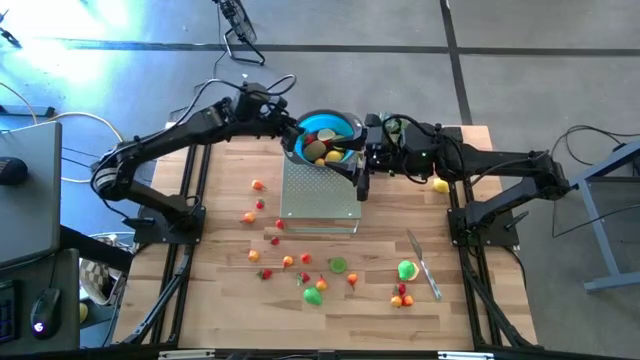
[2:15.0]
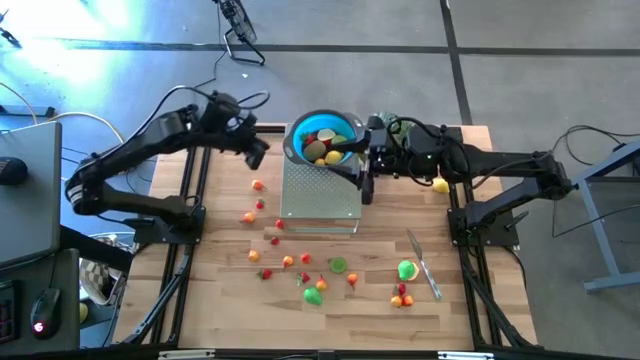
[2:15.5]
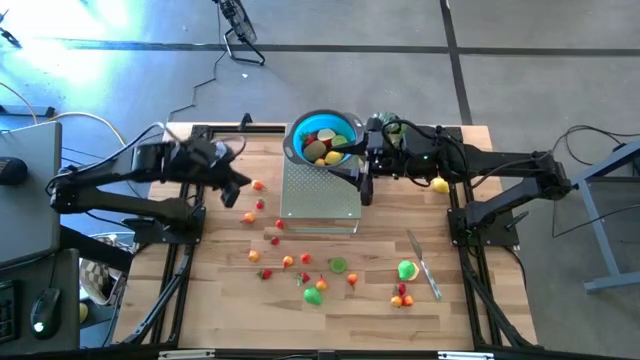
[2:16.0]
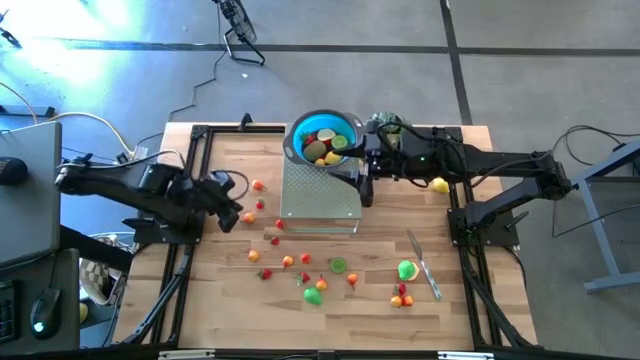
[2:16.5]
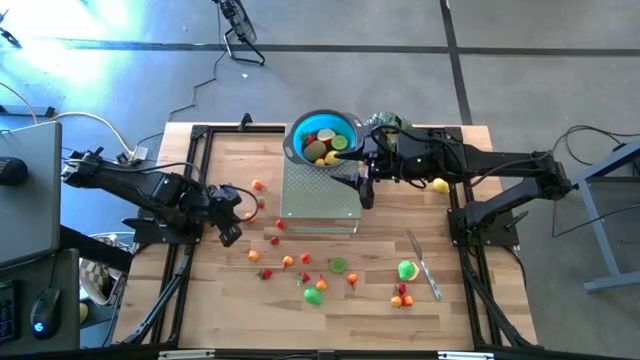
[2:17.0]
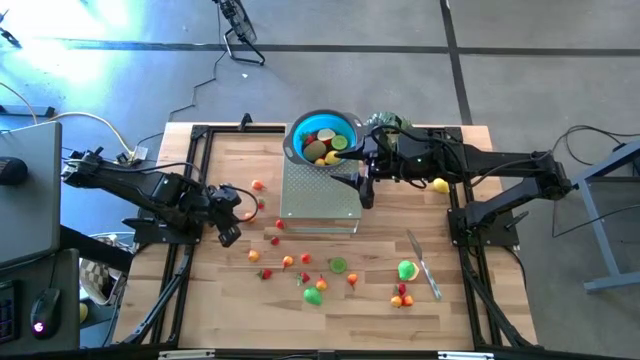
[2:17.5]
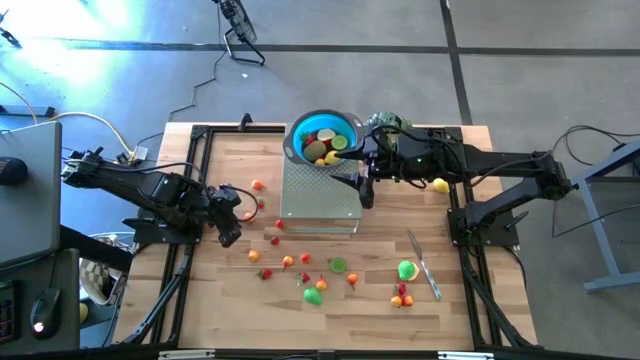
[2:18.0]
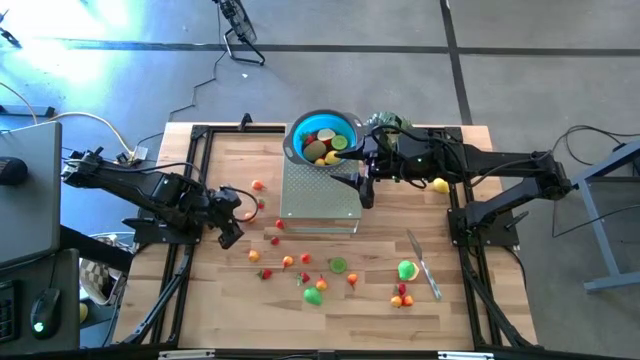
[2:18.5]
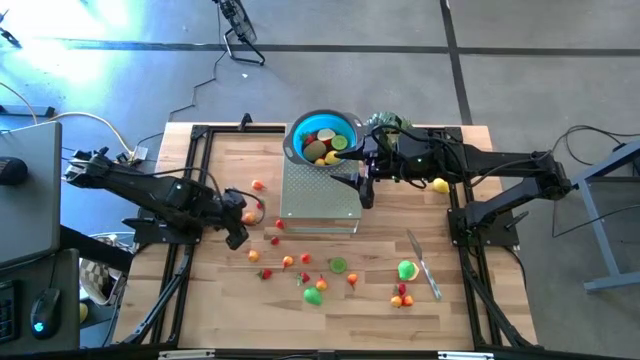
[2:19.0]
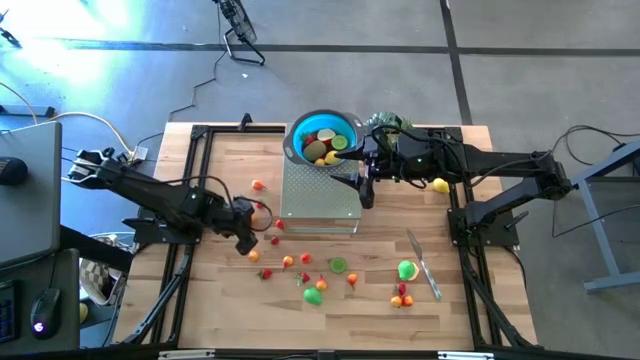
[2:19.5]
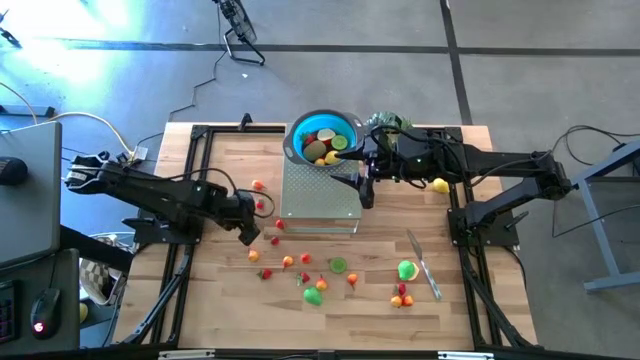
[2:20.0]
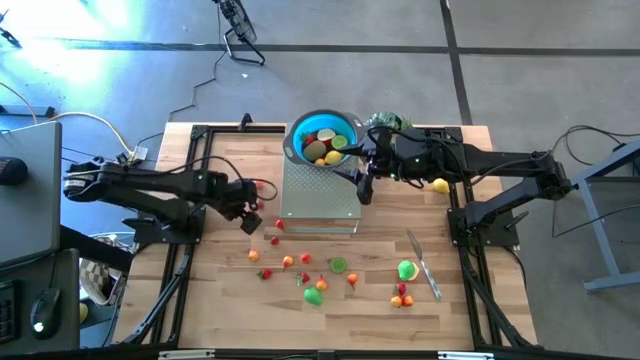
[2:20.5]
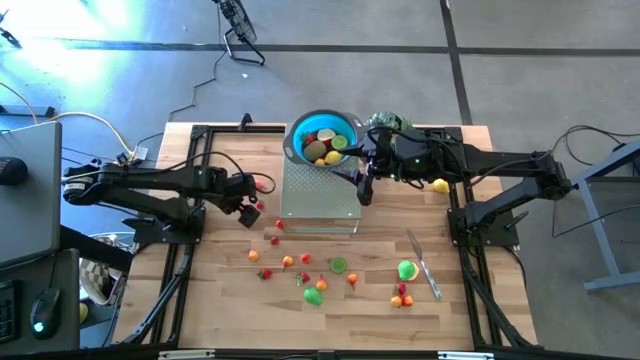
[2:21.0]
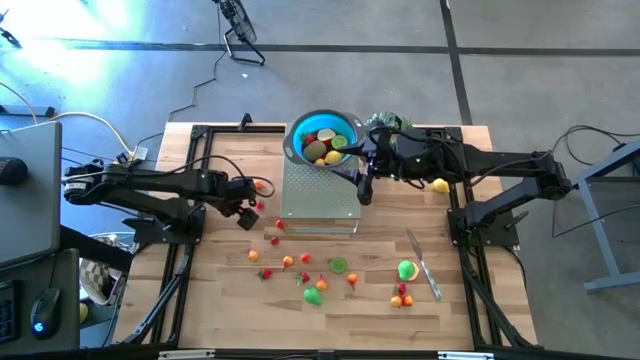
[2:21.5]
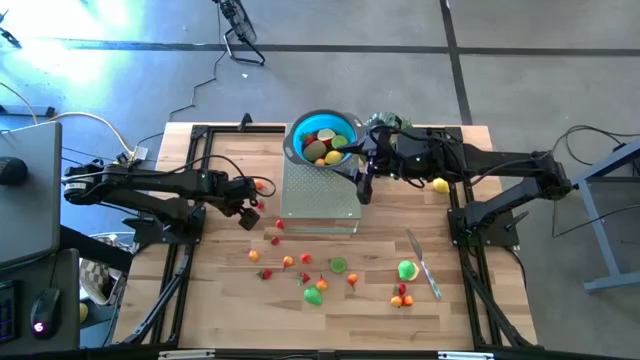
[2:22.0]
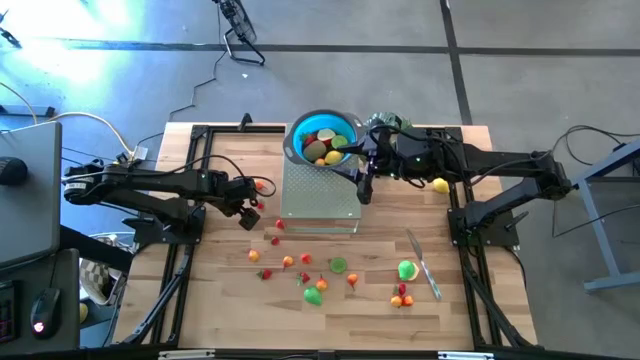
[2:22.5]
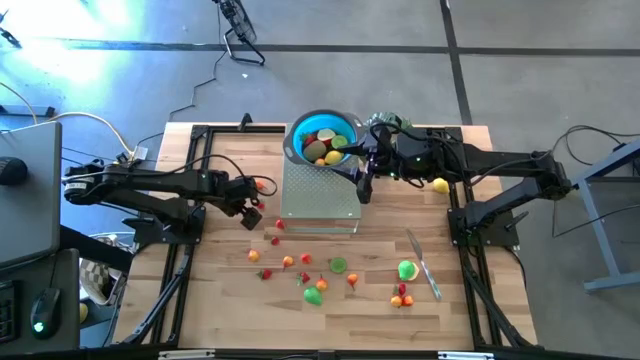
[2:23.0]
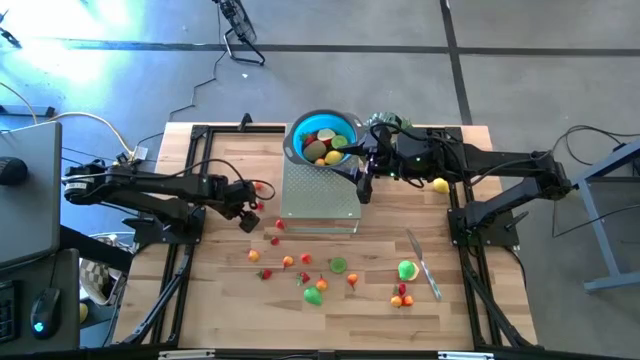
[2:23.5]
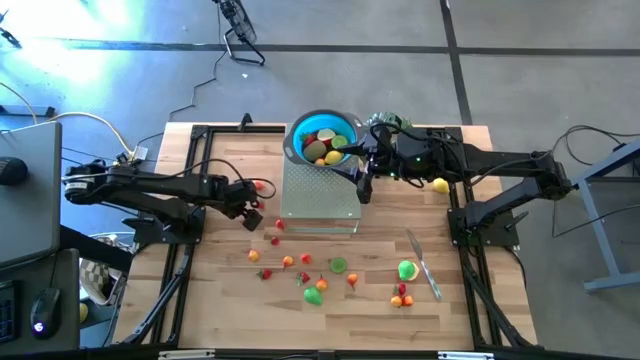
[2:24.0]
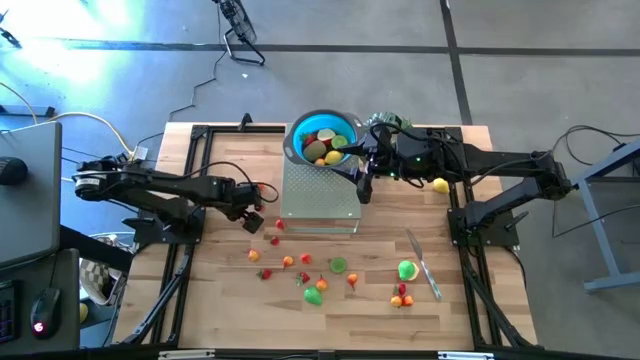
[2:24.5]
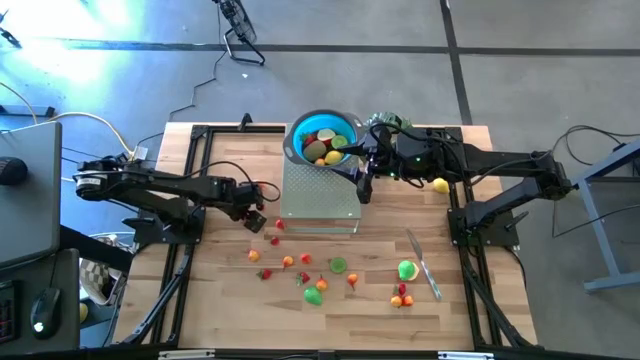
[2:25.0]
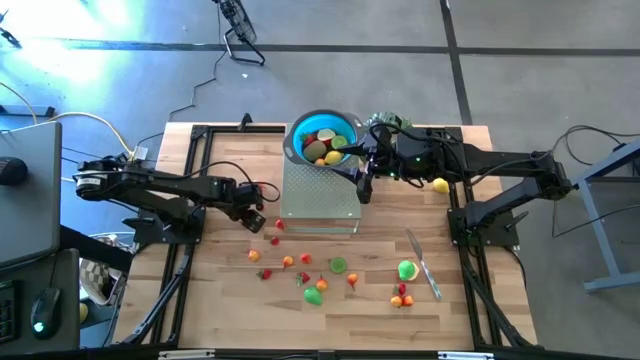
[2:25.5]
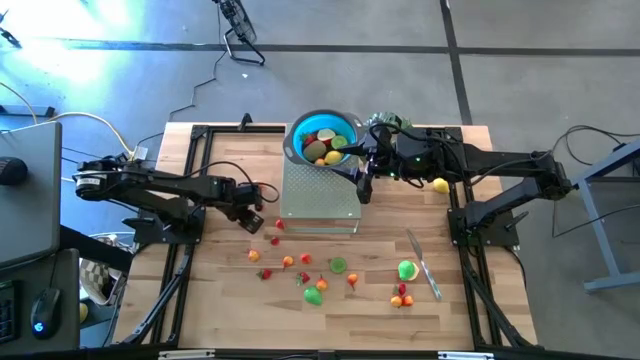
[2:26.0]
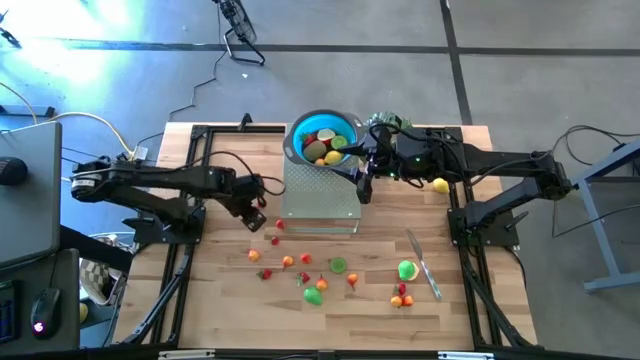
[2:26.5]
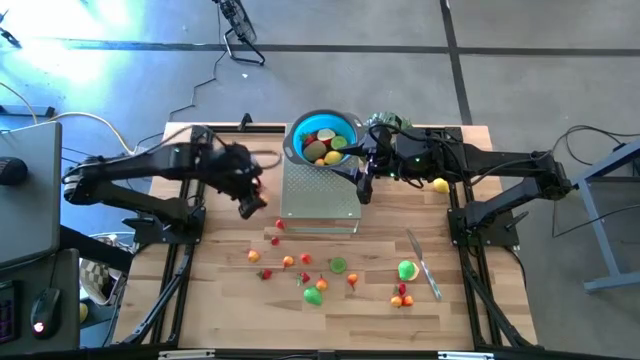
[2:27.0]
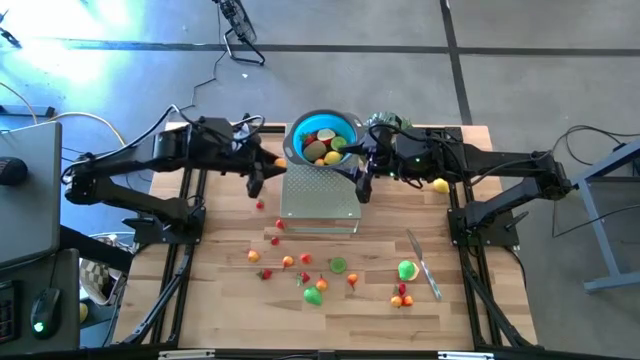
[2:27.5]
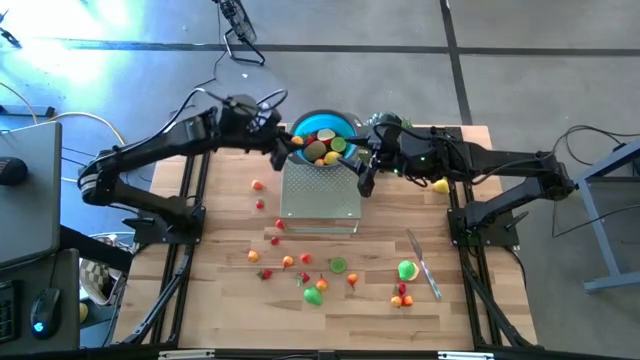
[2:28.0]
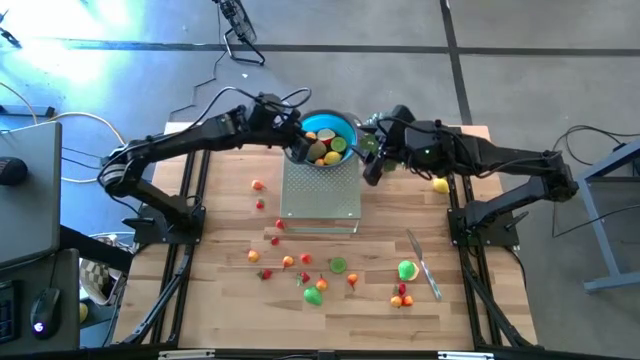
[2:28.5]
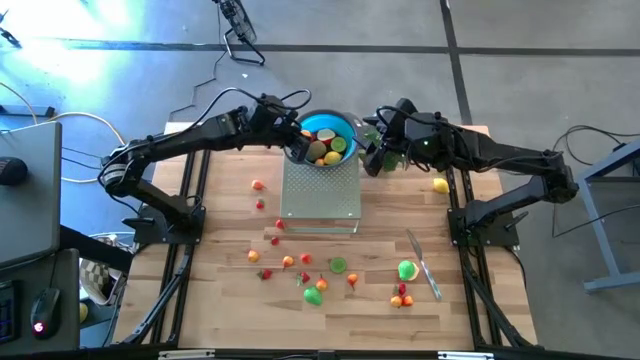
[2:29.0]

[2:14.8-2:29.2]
Task: Pick & Place Fruit
Put the orange peach in the blue bowl on the shelf

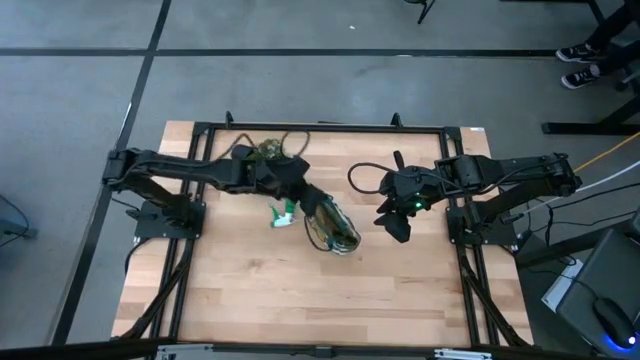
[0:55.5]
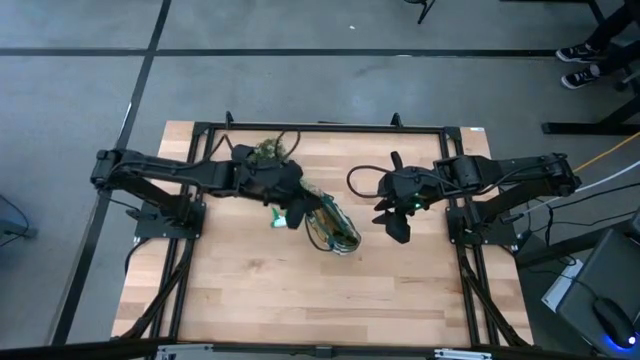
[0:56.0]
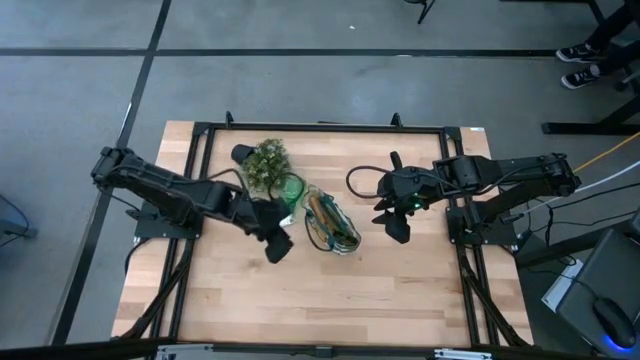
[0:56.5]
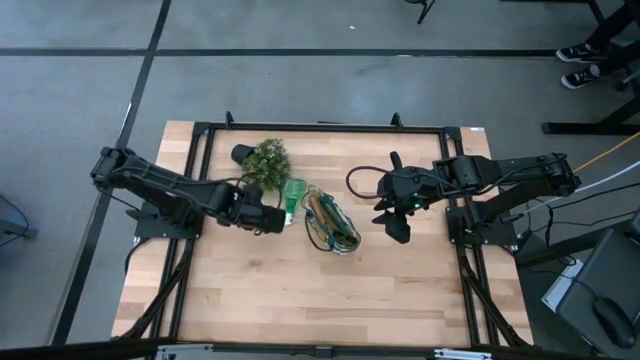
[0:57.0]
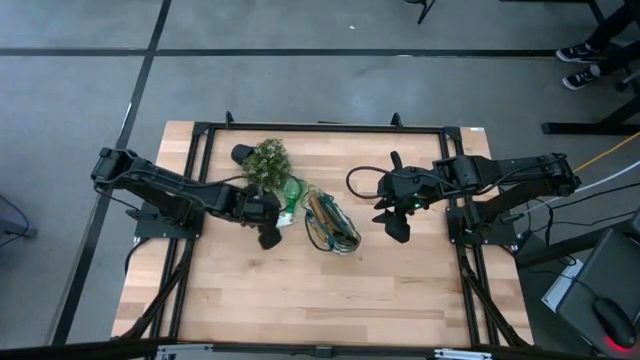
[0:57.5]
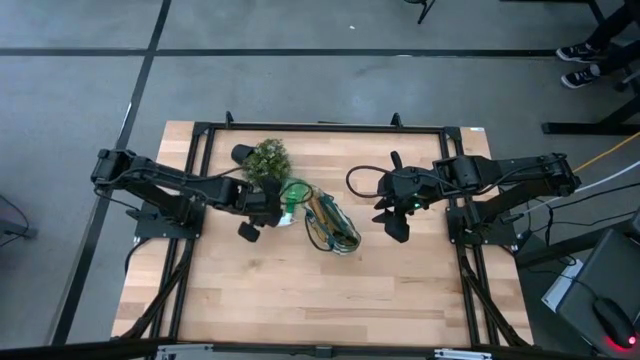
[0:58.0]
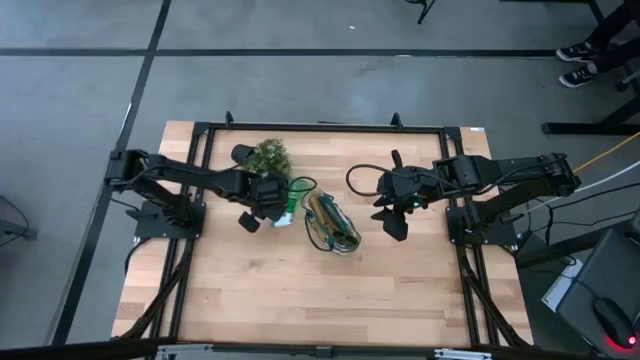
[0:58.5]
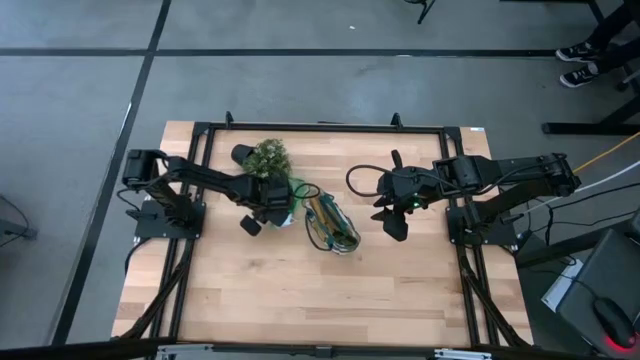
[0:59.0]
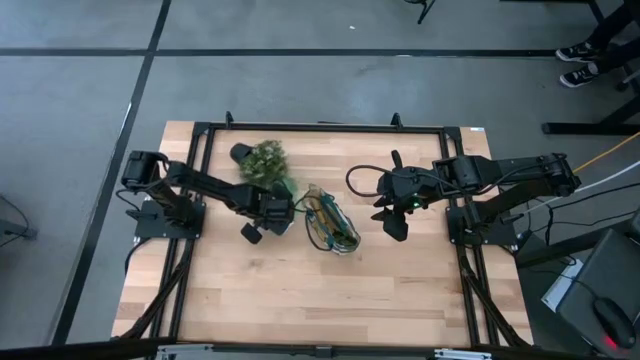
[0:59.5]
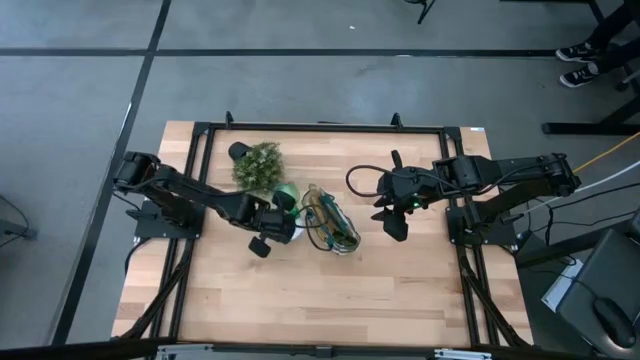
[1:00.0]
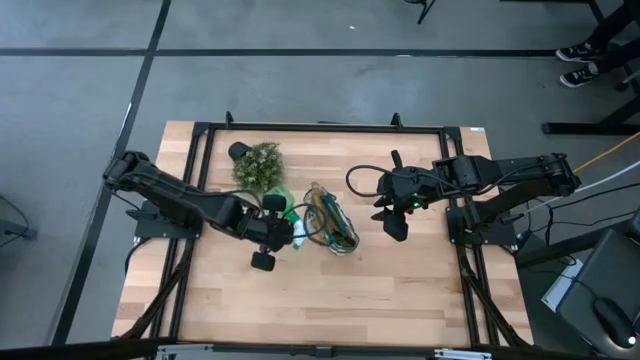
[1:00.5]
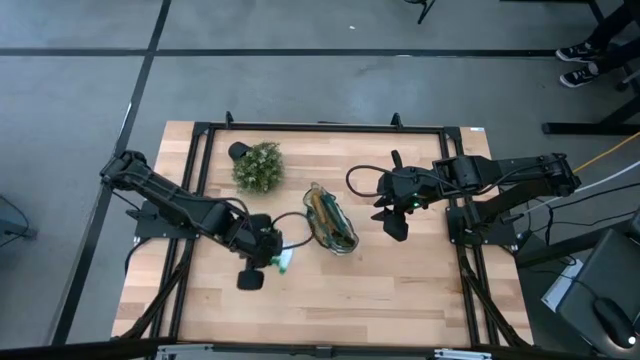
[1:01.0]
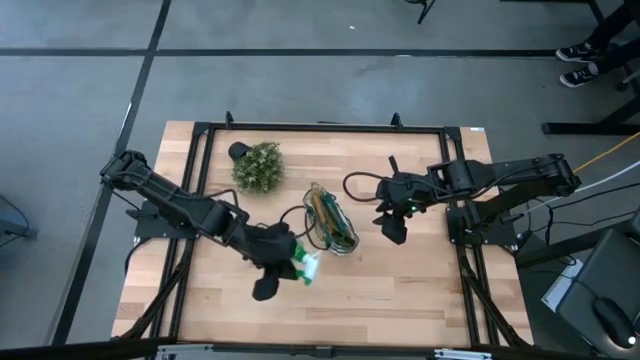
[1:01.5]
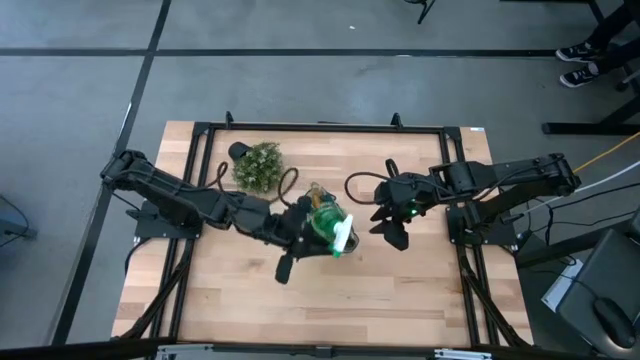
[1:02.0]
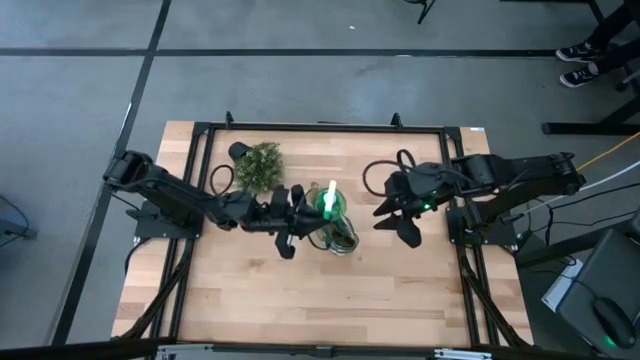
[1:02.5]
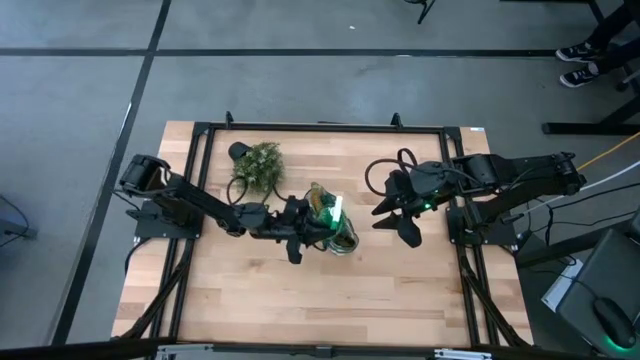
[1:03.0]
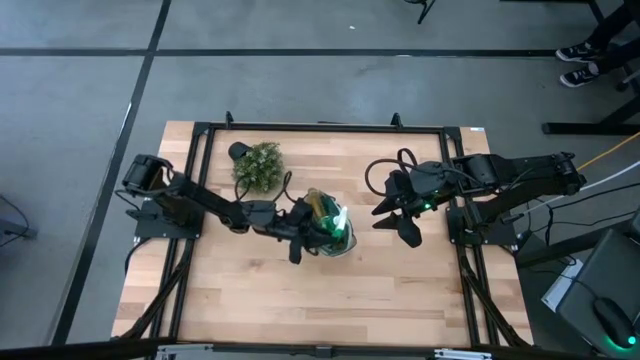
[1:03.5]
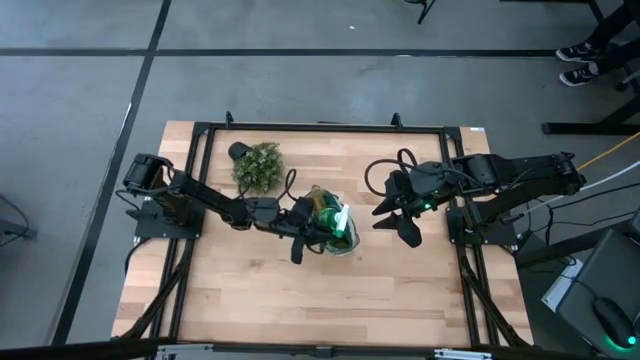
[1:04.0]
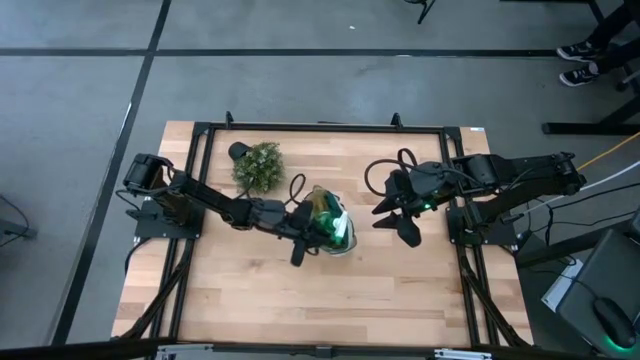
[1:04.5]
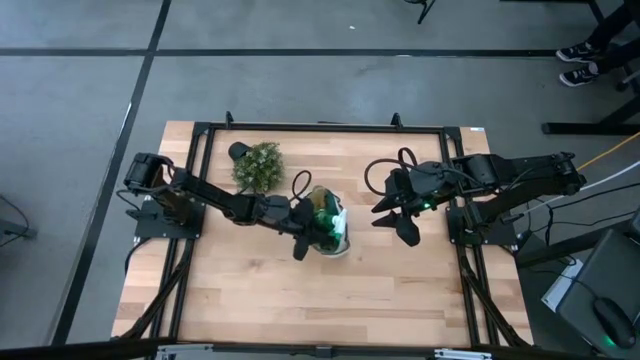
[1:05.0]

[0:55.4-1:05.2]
Task: Pick & Place Garden tools in Gardening bag
Put the green spray bottle into the light brown gardening bag
